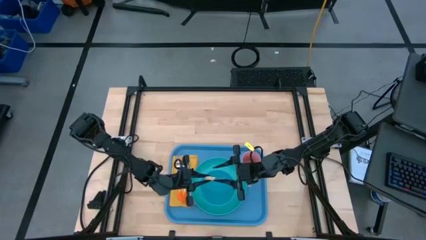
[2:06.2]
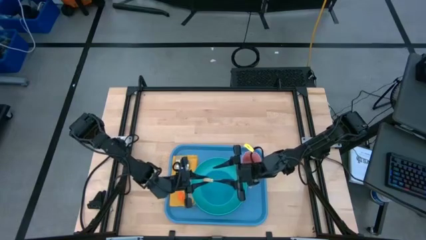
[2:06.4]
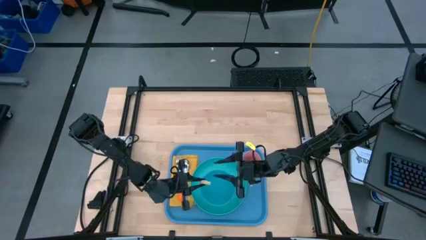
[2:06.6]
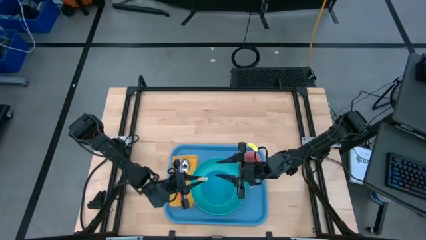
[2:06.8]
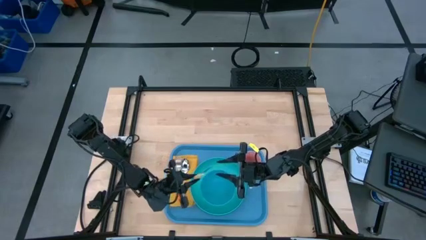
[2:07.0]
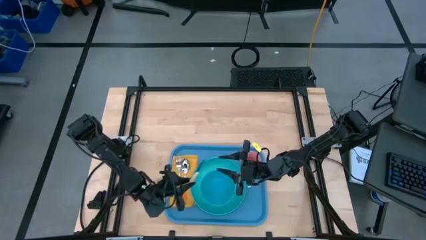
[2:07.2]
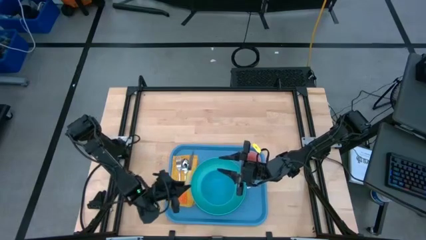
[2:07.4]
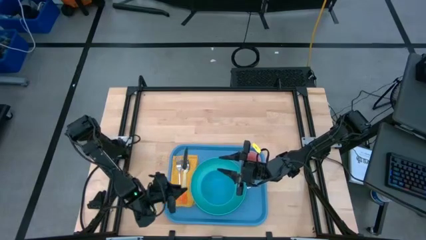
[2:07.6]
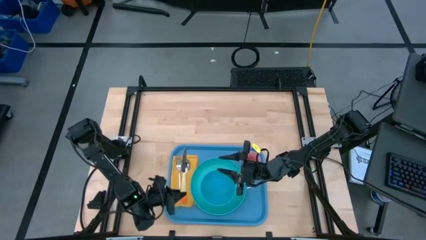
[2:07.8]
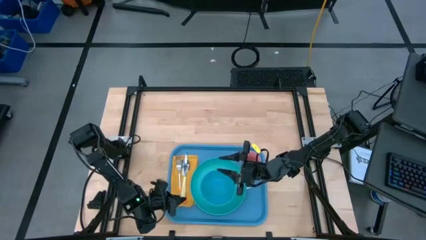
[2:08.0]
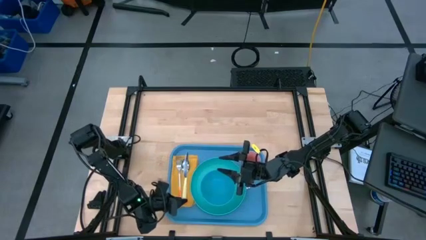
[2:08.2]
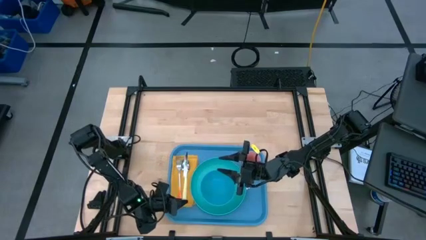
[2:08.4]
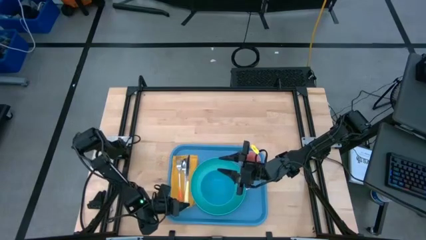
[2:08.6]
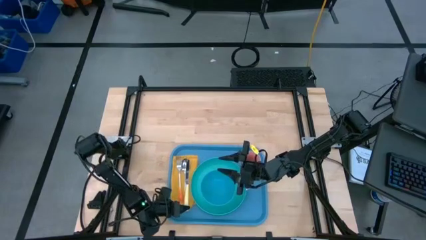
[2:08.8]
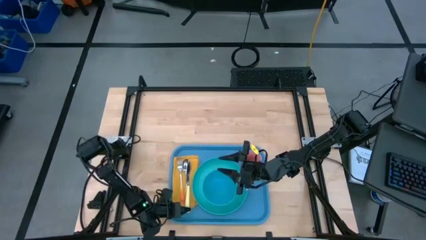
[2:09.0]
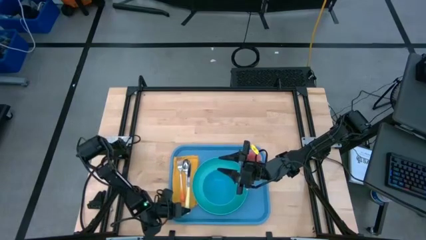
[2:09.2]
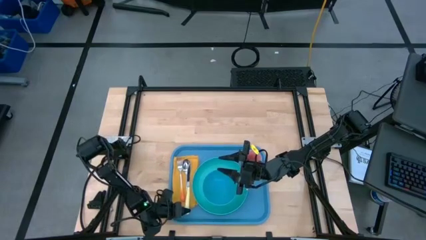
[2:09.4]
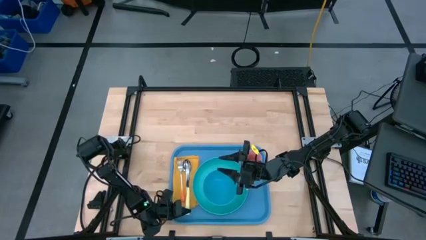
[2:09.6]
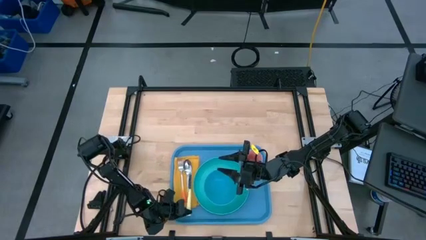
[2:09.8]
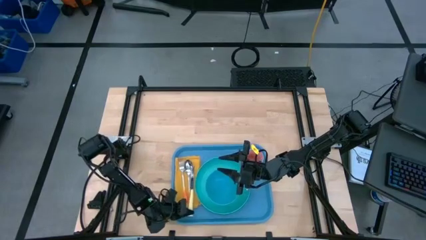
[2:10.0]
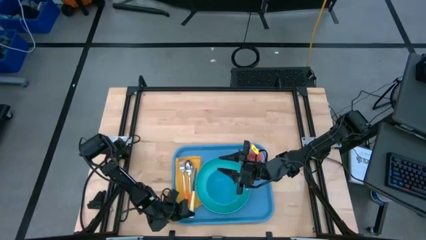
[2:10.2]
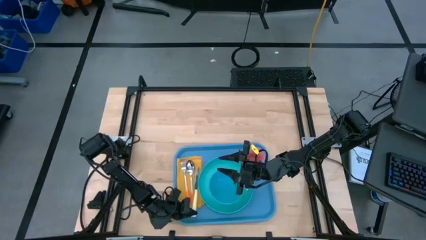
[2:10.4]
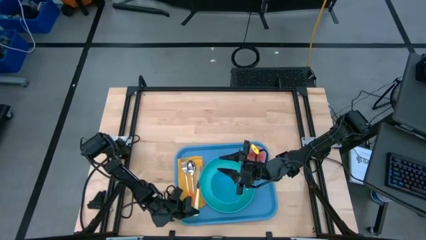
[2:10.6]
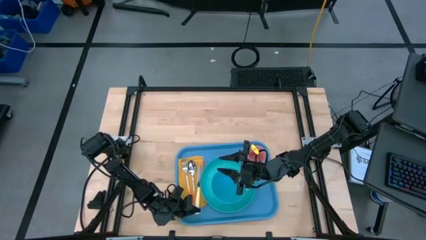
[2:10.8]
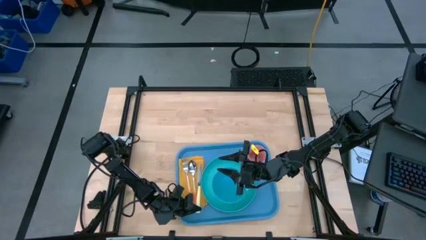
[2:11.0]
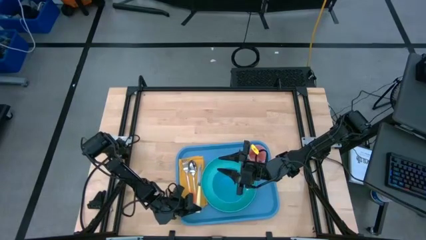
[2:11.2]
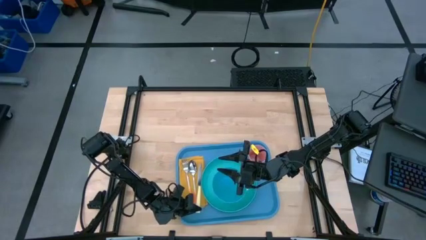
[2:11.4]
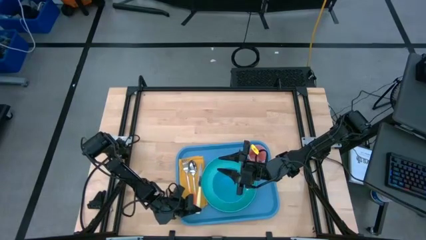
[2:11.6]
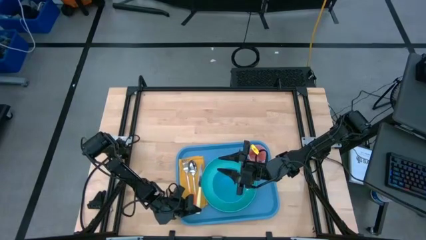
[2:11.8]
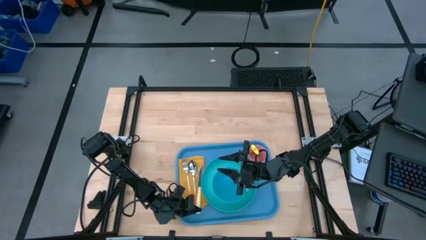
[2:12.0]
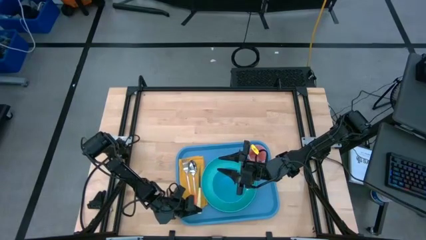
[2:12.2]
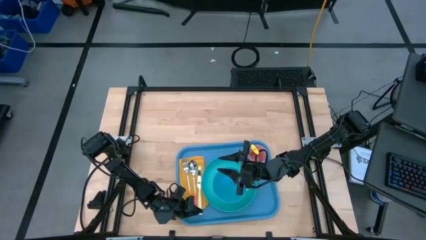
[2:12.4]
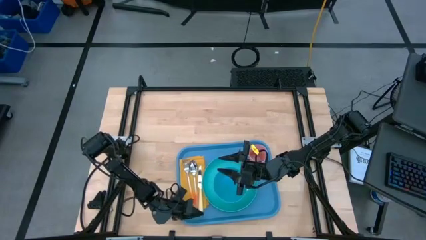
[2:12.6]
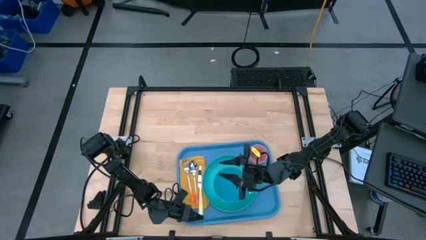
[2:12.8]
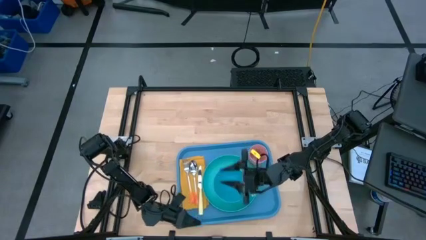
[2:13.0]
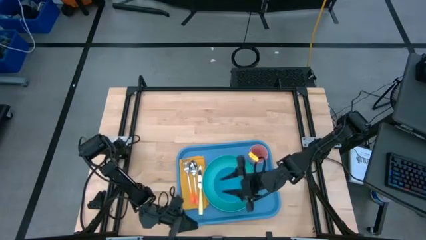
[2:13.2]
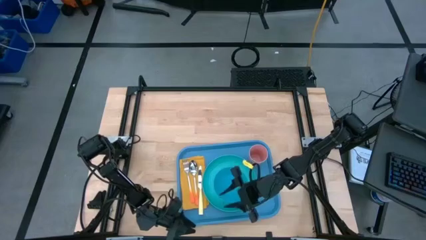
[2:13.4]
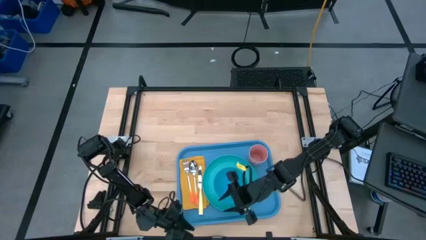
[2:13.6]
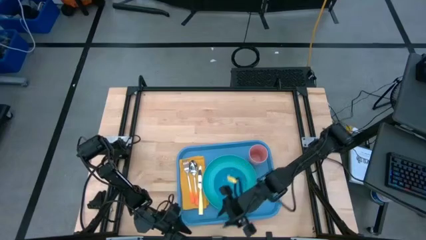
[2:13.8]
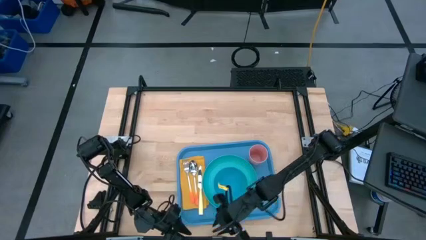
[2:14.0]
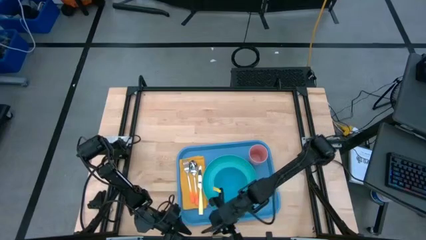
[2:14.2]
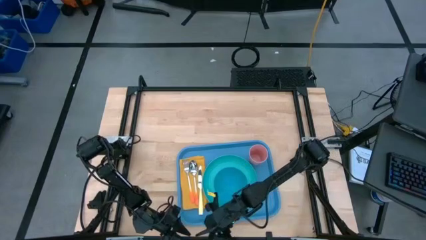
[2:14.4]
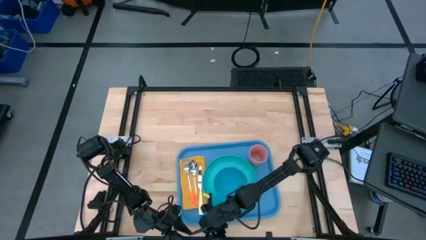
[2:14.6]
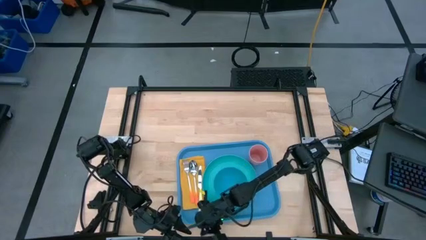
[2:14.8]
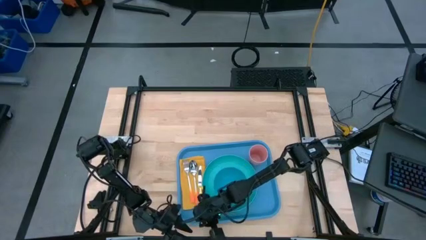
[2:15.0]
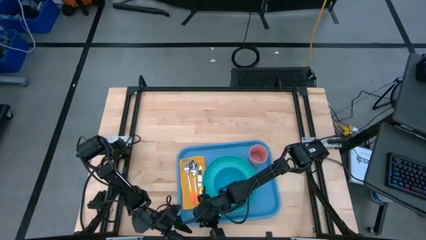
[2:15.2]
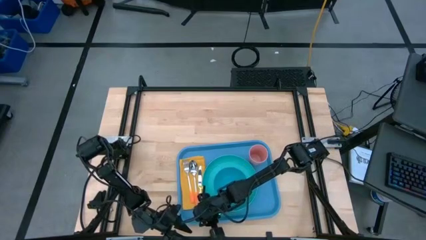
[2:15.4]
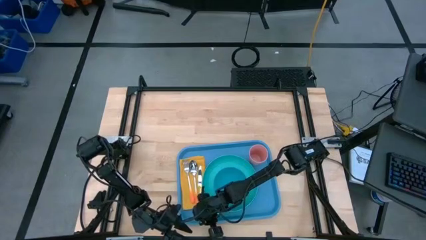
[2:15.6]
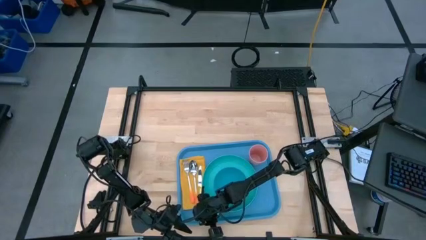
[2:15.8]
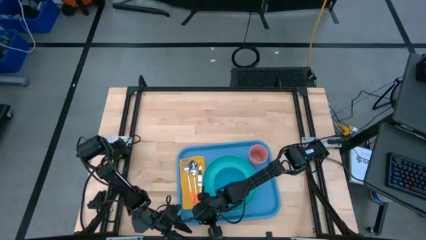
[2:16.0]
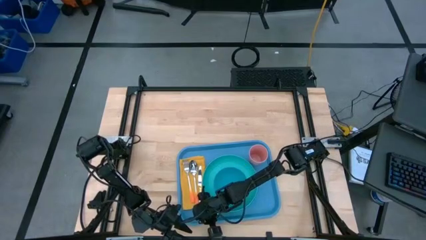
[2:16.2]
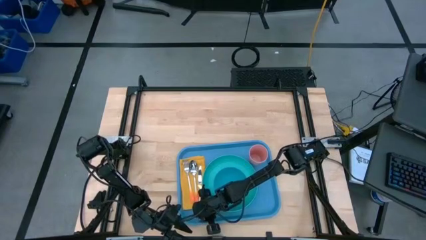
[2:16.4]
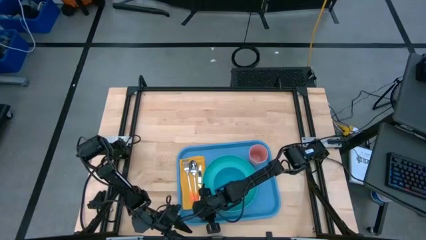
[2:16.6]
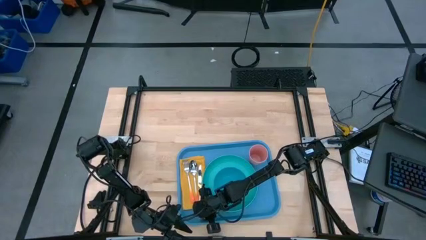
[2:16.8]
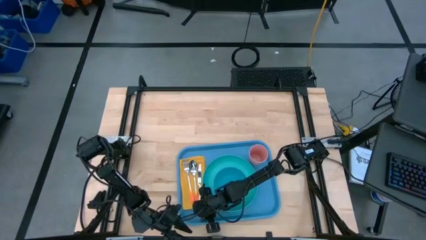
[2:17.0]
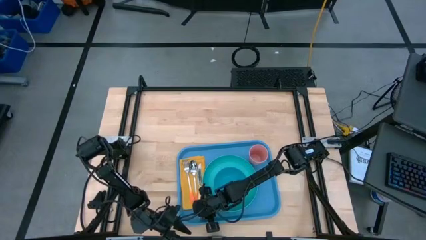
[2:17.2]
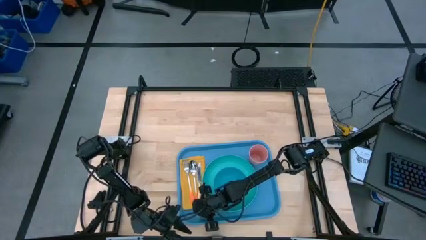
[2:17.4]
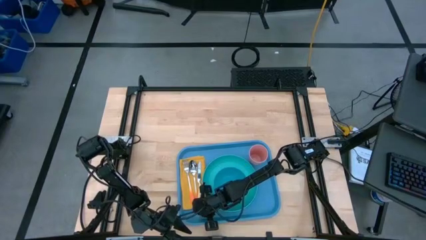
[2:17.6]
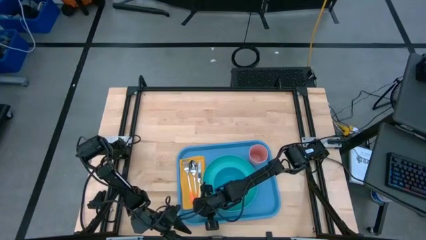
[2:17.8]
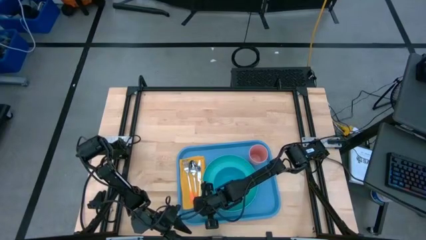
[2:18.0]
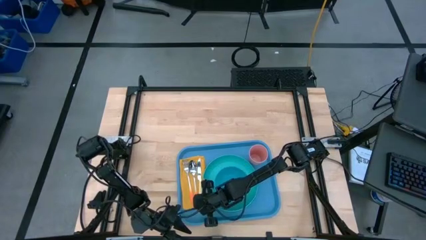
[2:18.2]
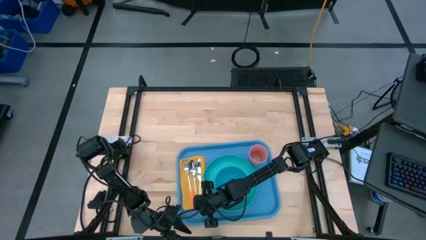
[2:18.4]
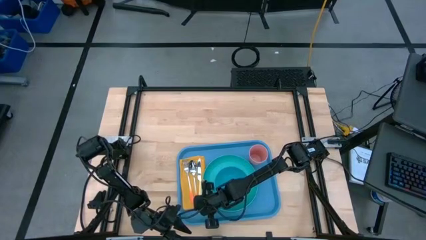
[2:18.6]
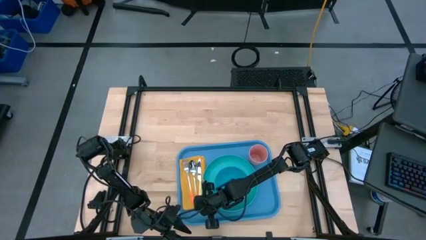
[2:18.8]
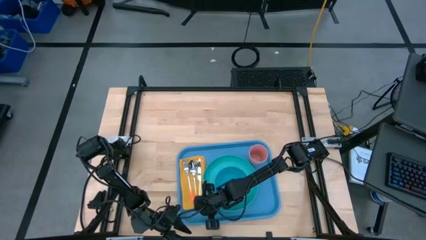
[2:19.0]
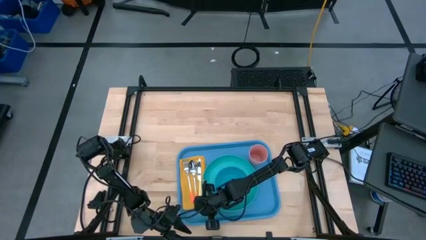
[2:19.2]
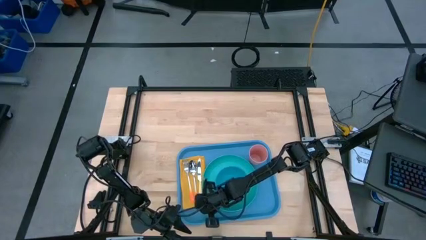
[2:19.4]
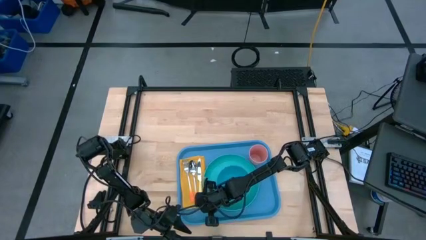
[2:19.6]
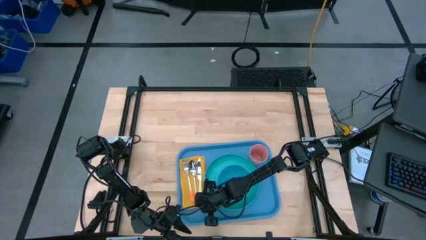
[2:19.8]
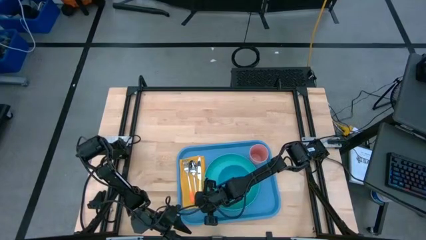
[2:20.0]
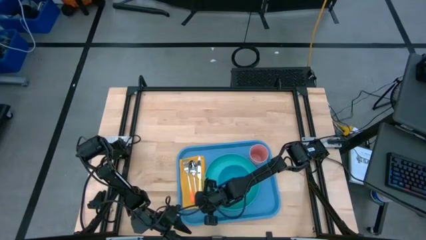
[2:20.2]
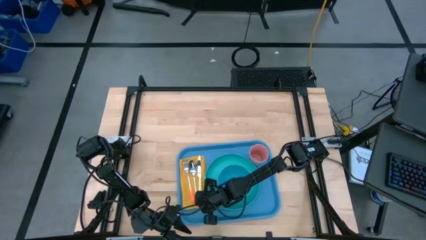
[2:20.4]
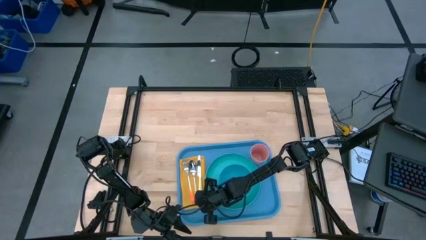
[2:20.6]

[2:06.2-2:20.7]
Task: Set up tray
Put the yellow knife on top of the yellow napkin to the right of the orange spoon

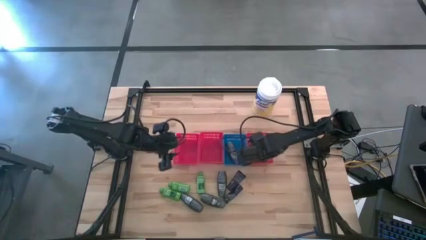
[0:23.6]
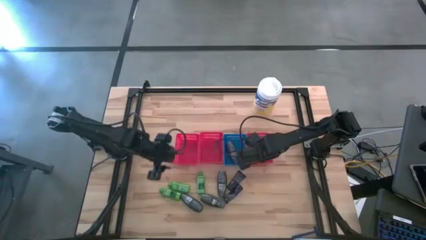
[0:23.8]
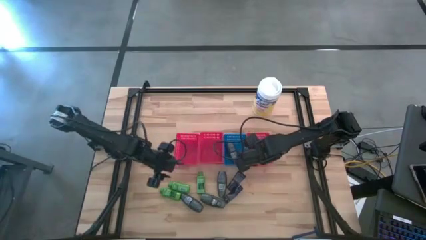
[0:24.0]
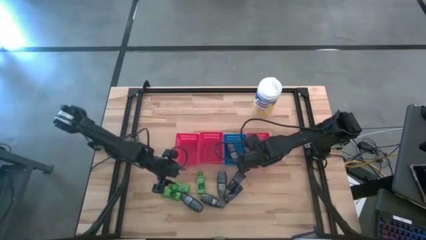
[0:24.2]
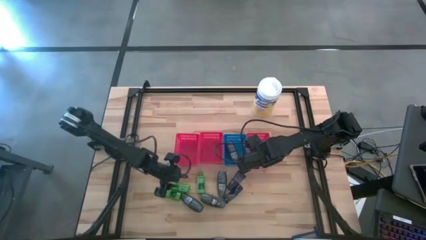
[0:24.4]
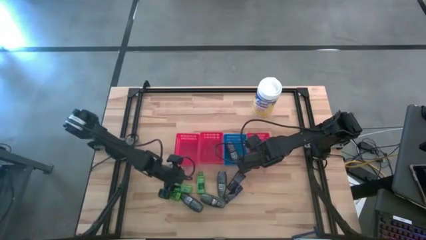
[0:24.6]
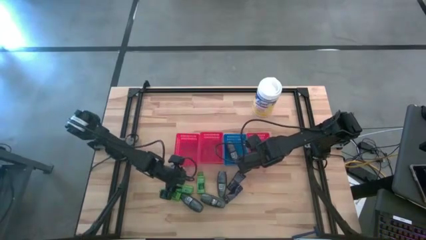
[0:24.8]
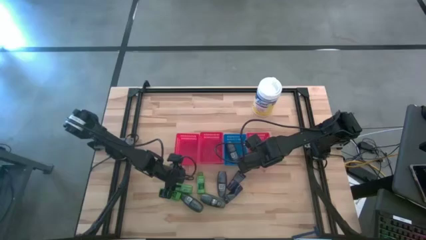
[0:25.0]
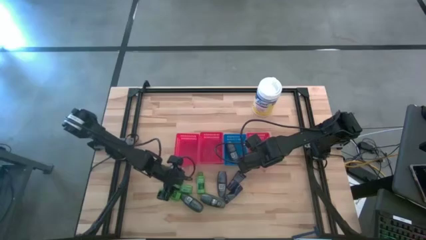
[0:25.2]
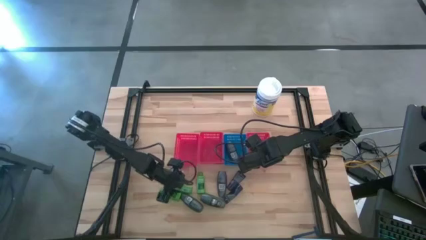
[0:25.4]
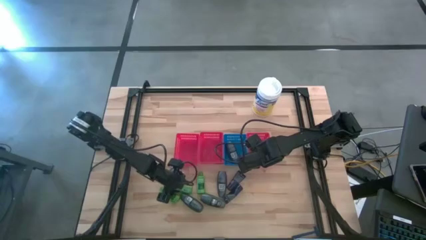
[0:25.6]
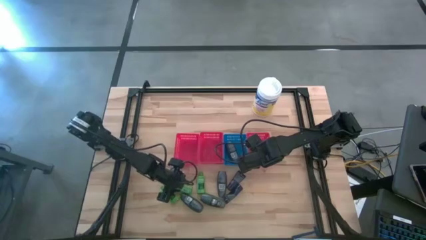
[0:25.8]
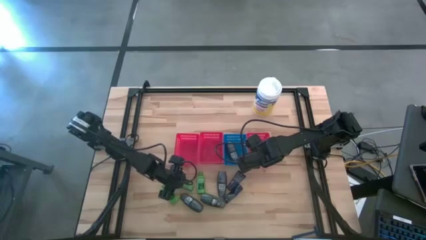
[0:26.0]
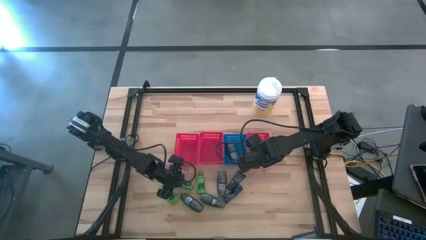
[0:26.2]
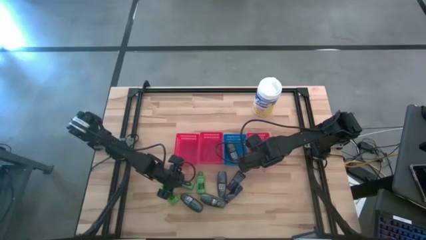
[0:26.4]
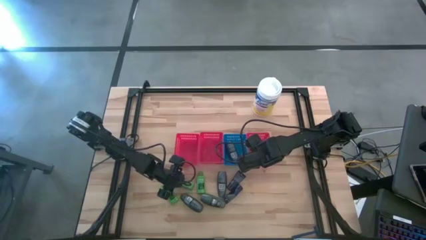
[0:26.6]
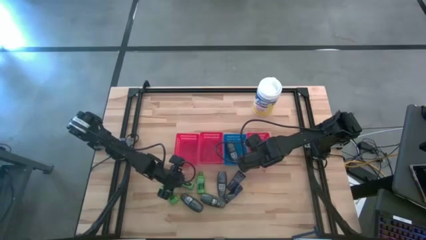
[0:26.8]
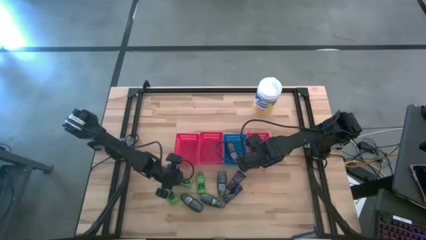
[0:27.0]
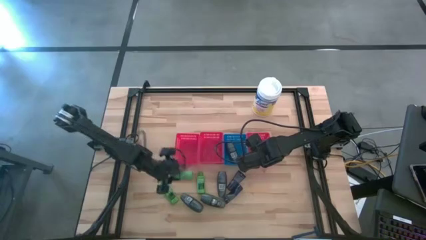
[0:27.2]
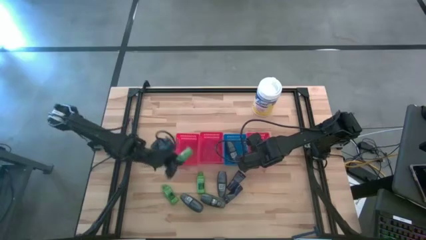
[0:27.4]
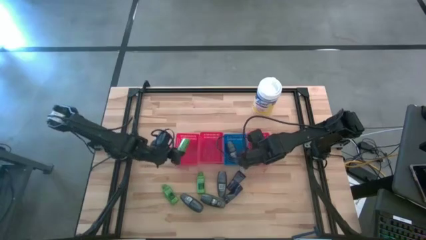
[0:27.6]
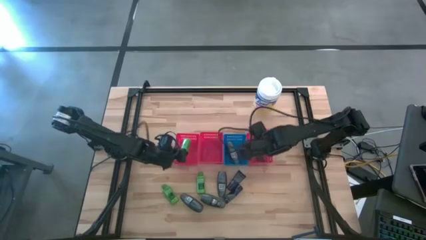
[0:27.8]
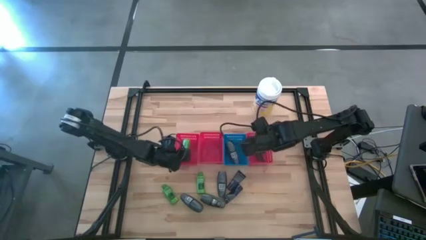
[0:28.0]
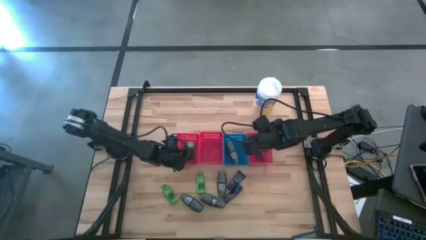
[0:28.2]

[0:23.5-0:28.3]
Task: Pick & Place Travel size toiletries
Put the shampoo into the left red bin
